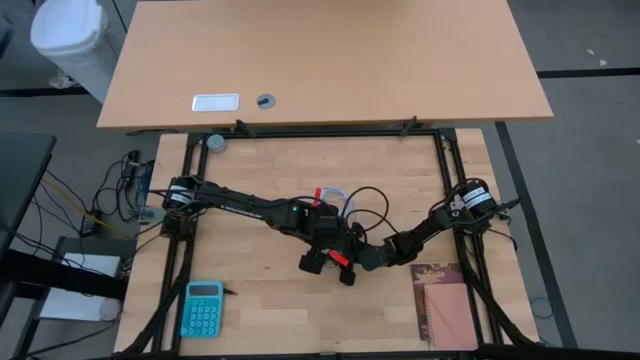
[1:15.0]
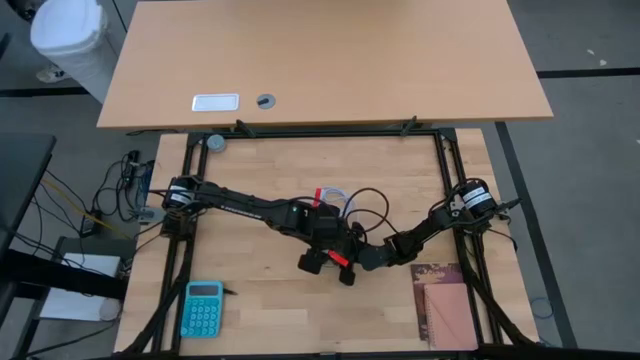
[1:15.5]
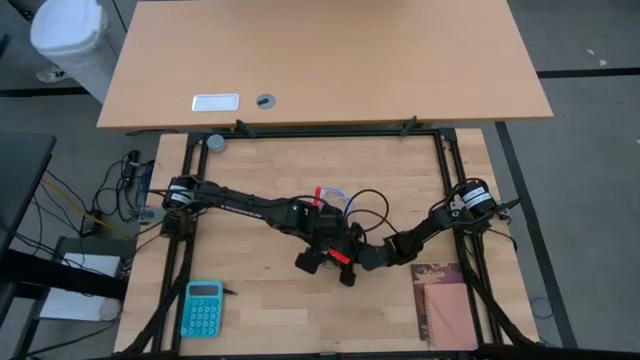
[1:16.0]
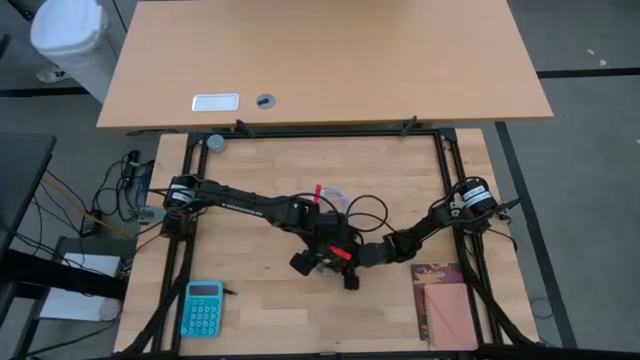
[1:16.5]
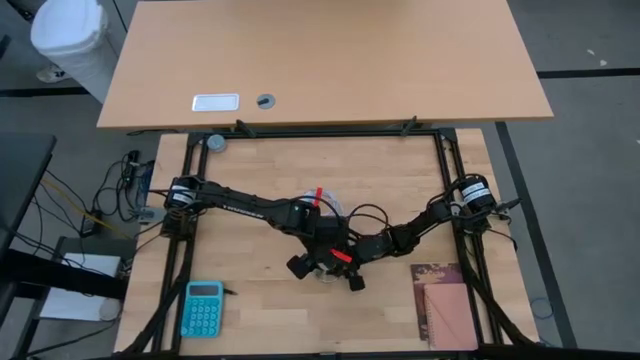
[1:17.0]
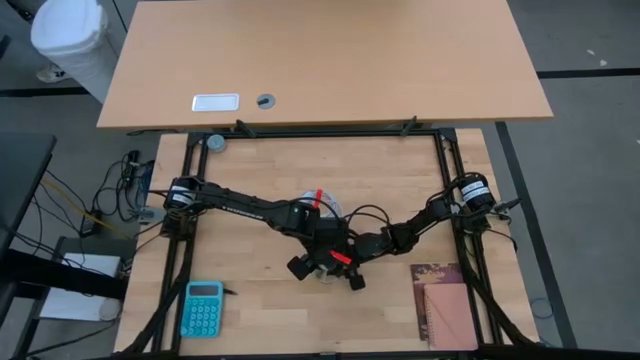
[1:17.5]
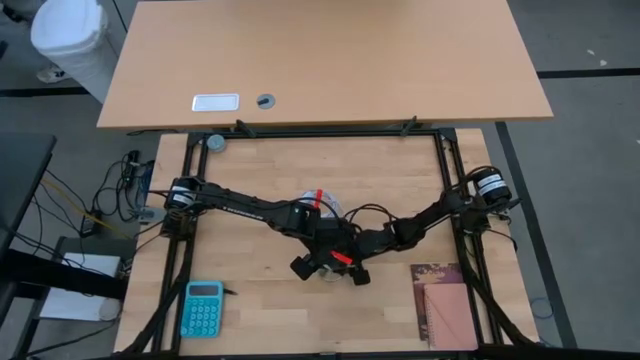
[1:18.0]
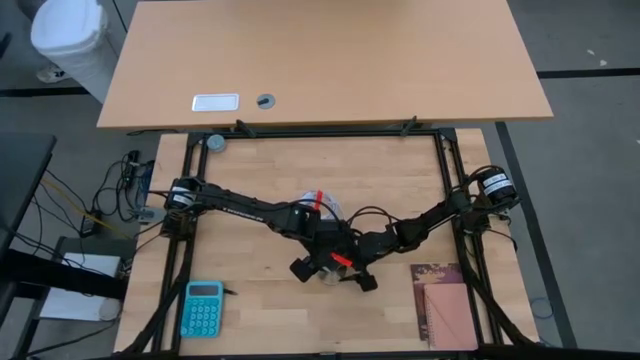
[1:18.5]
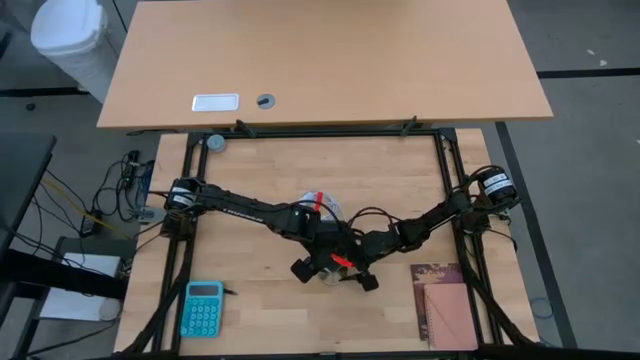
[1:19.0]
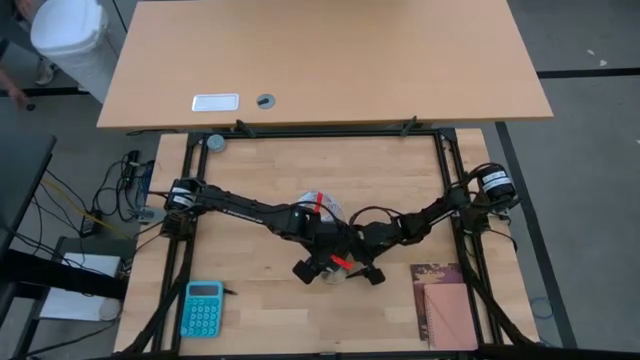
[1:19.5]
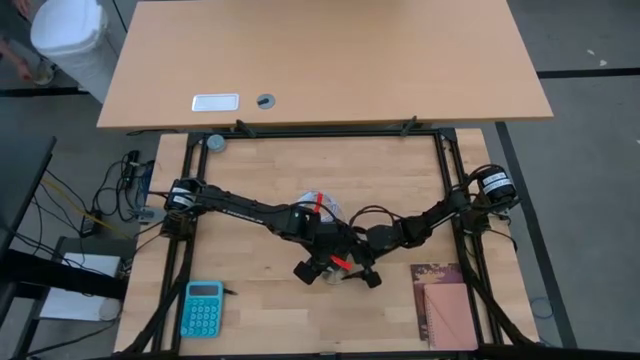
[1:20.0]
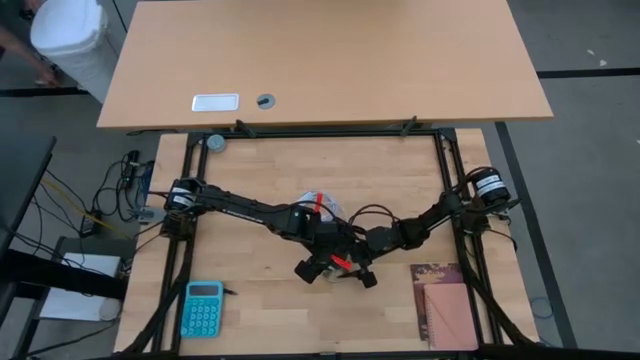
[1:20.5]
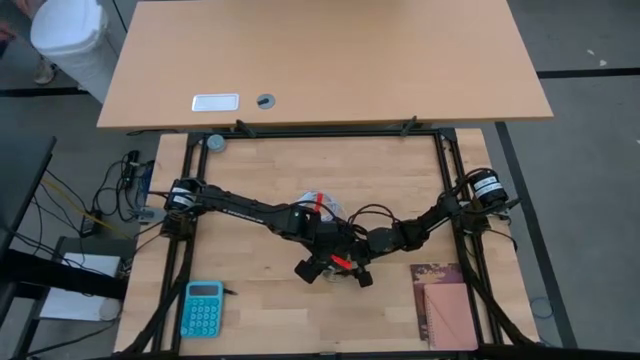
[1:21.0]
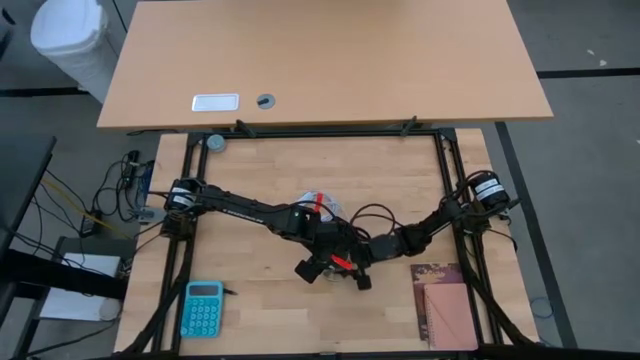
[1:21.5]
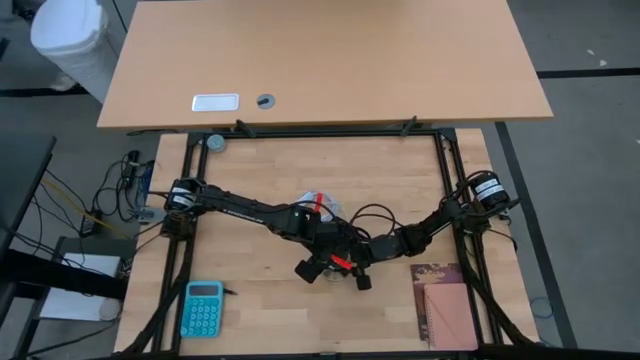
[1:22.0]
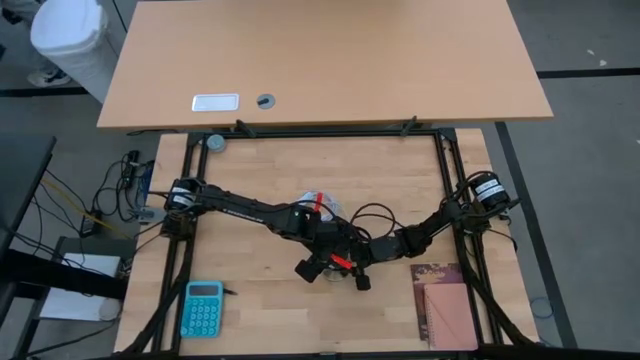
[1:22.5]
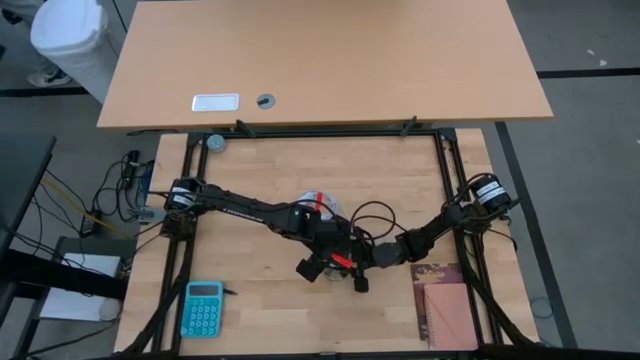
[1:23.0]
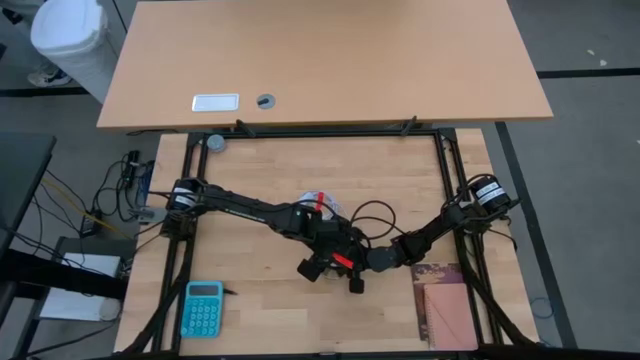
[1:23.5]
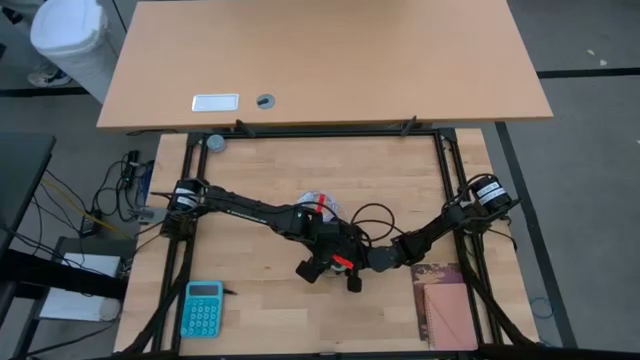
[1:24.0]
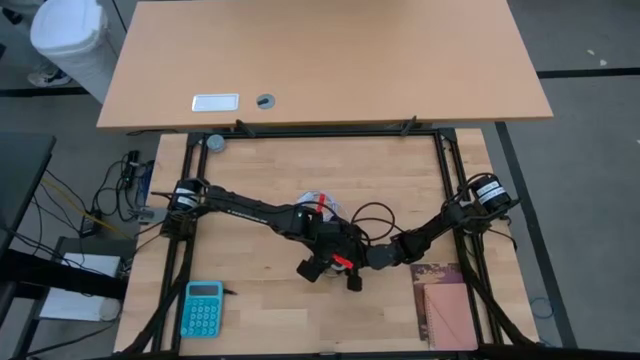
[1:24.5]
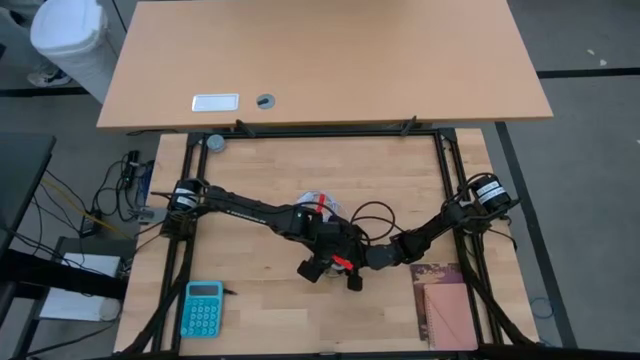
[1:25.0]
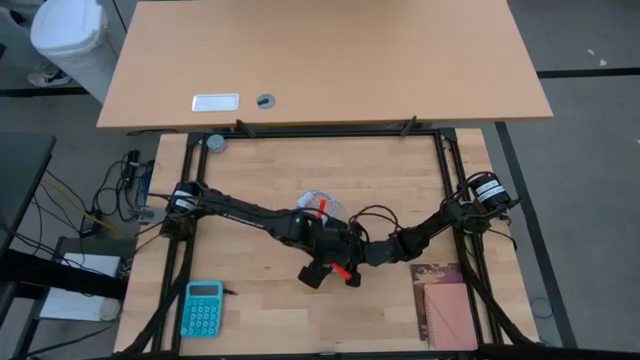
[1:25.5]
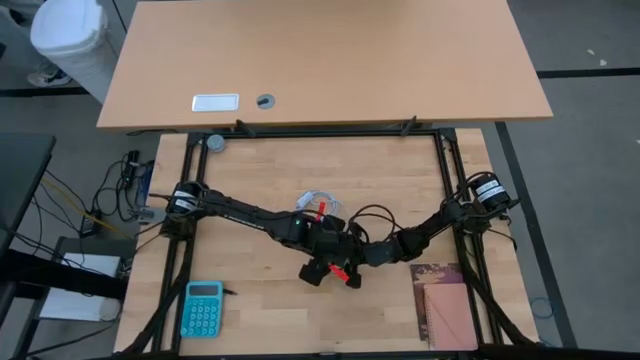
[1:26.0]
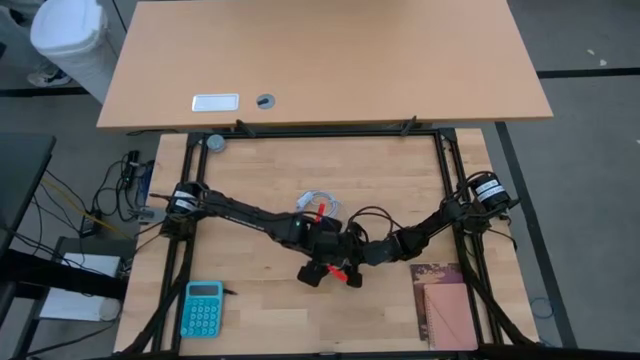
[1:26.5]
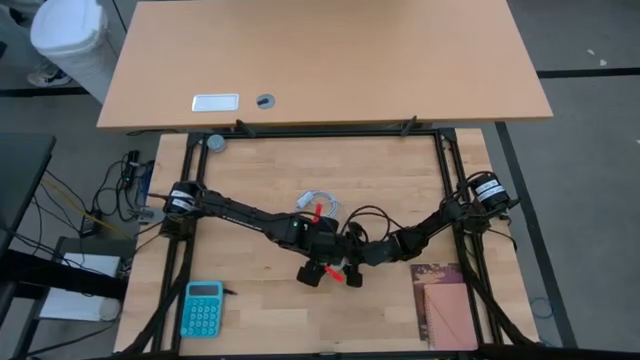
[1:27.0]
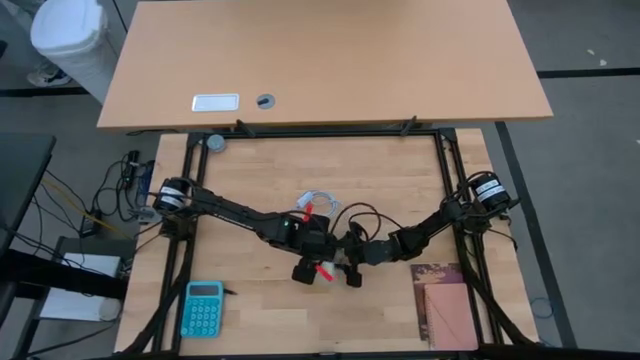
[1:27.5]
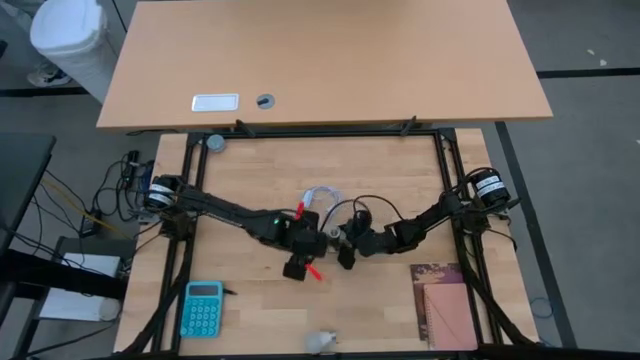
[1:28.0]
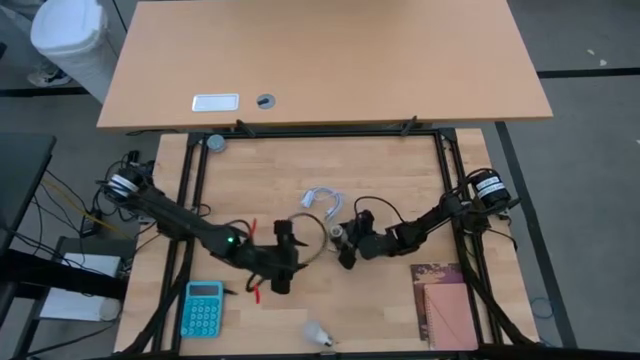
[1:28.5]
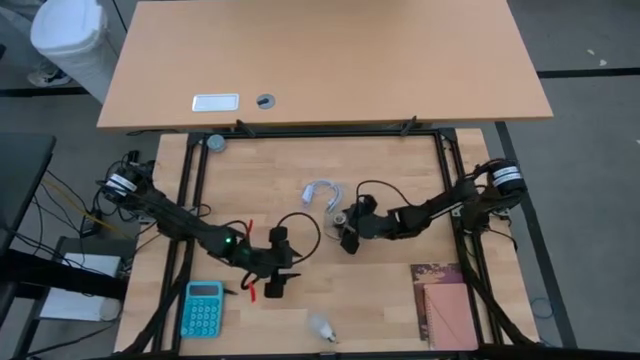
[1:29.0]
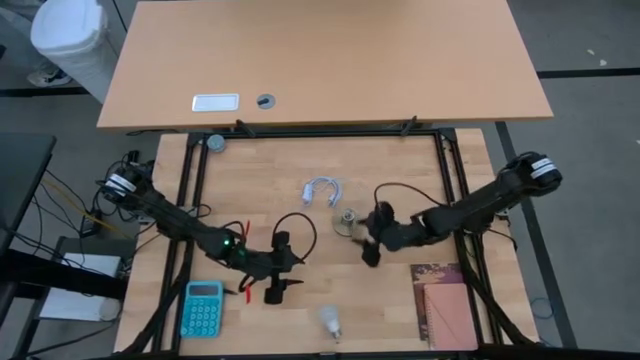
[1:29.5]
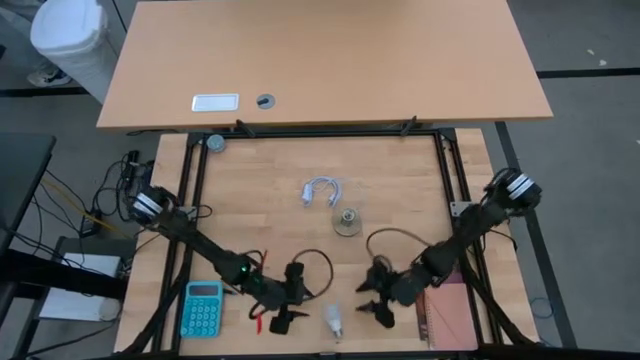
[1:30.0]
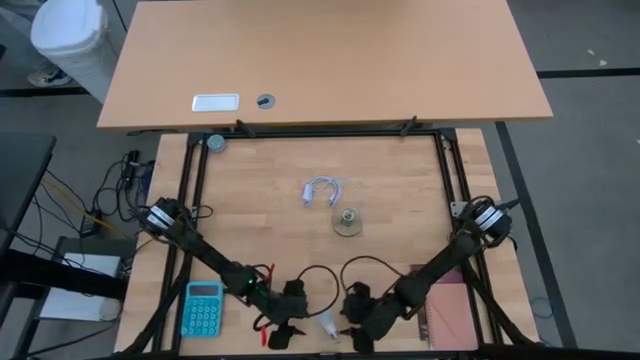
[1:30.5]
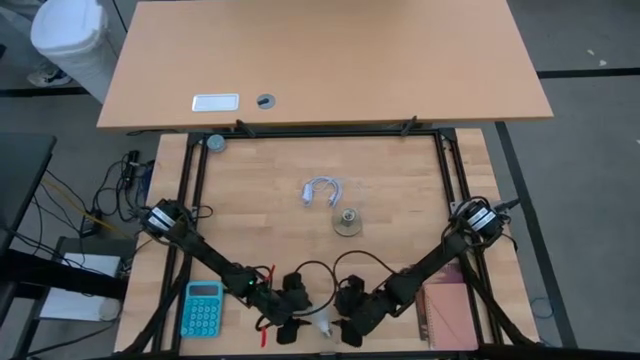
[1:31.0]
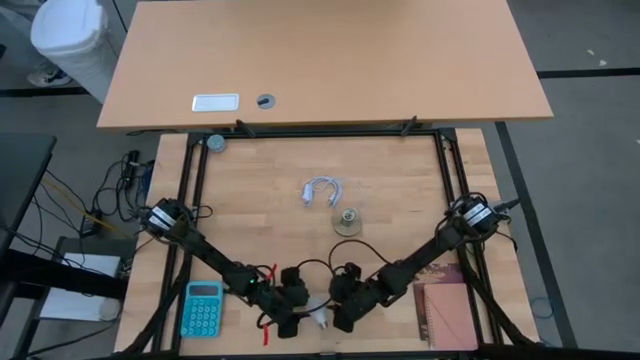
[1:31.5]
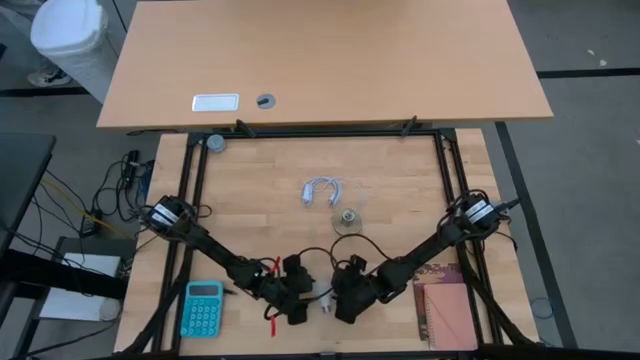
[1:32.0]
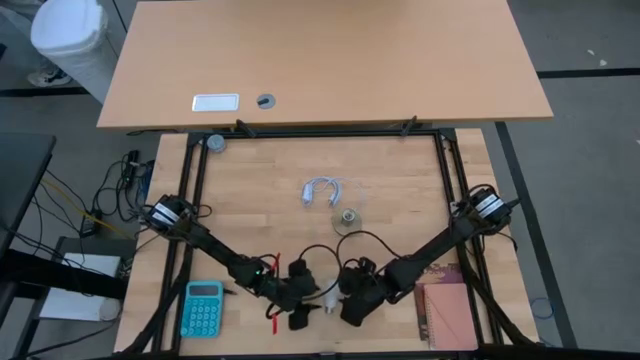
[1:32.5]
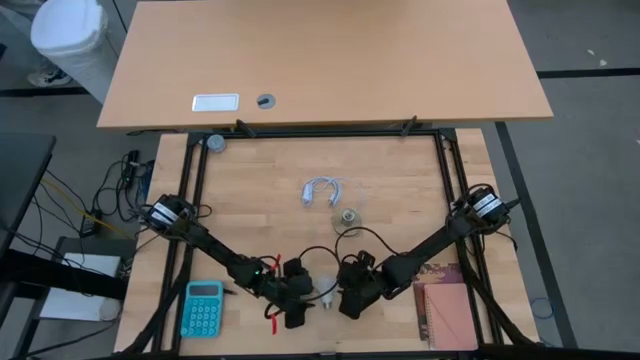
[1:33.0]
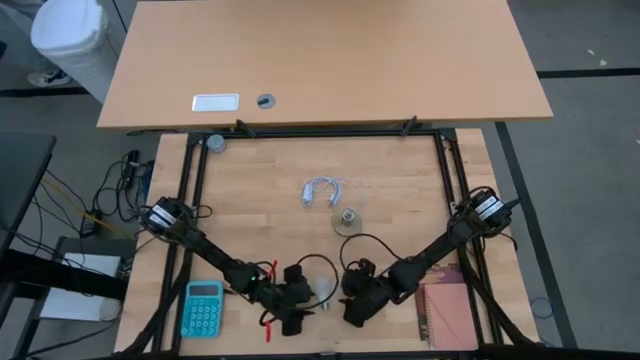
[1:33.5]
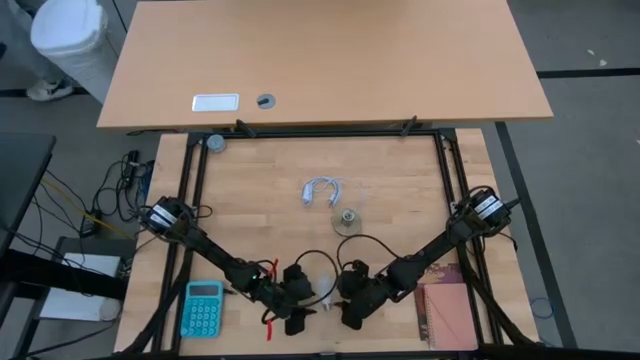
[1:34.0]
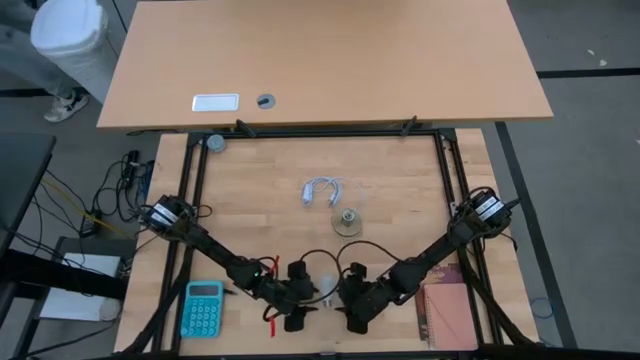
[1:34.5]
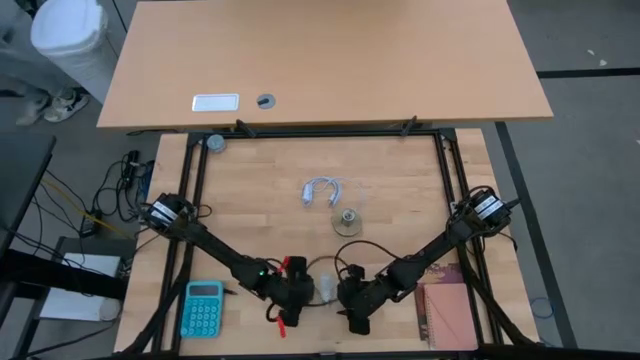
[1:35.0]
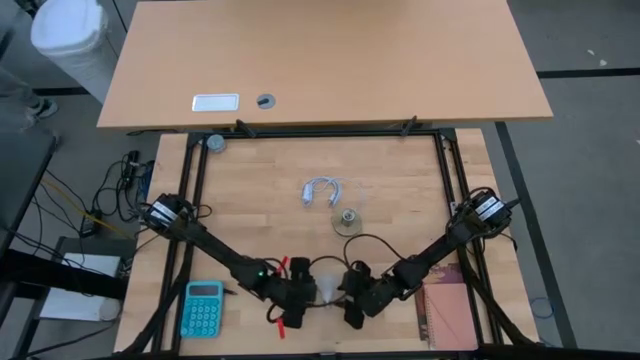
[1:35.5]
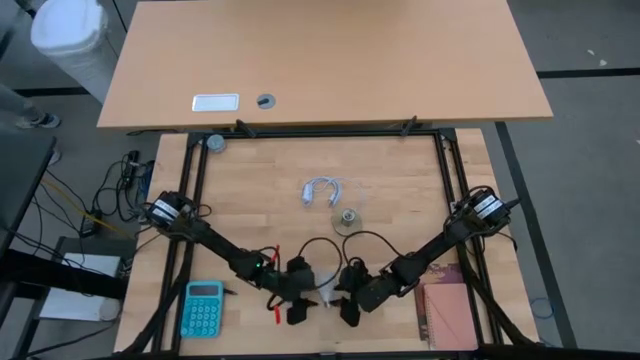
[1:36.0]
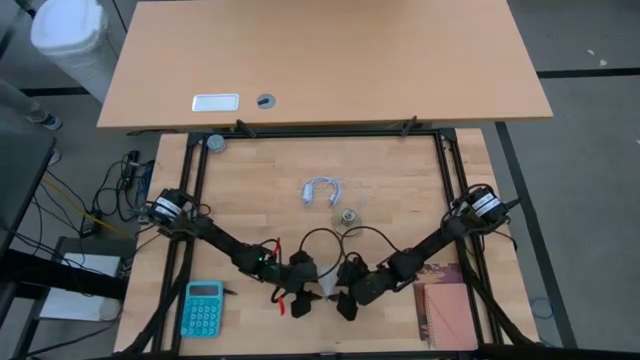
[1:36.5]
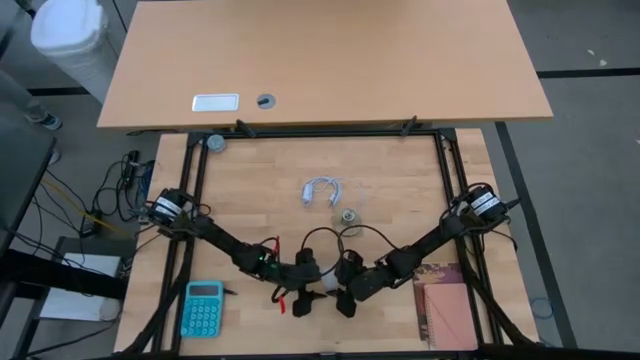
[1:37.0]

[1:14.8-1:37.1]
Task: Screw lightbulb
Insert the white lightbulb into the lamp socket
